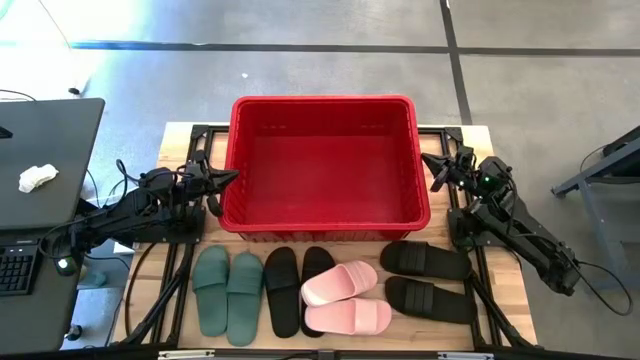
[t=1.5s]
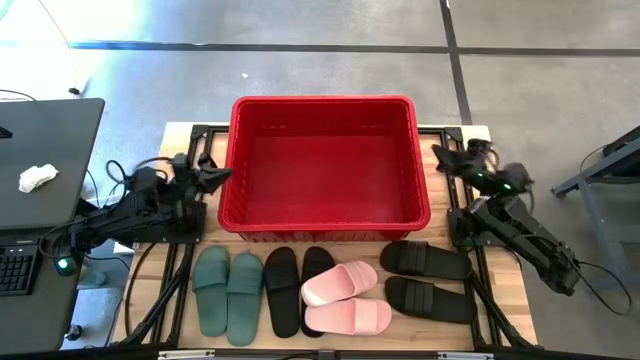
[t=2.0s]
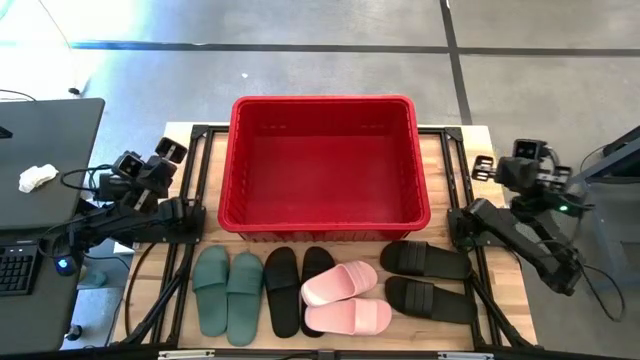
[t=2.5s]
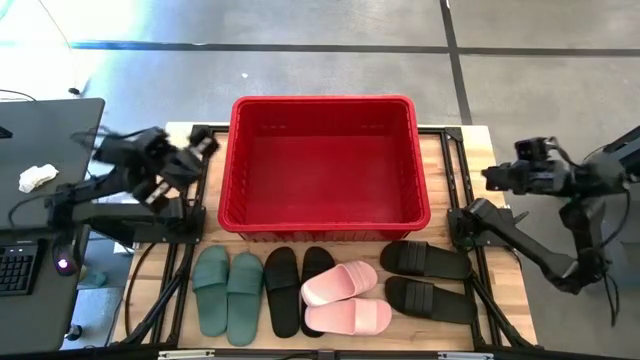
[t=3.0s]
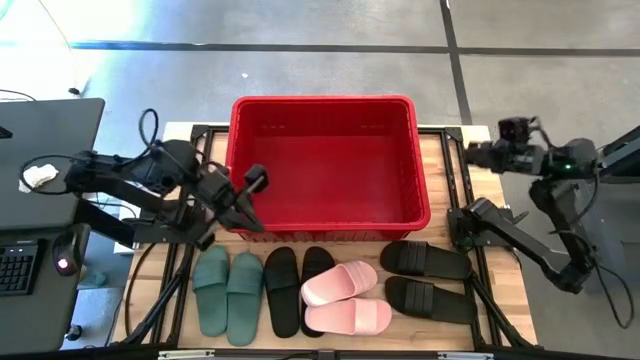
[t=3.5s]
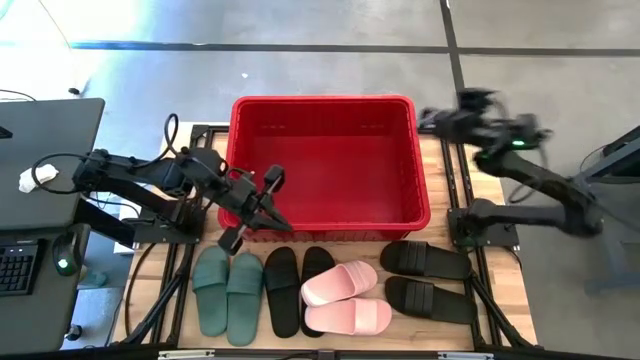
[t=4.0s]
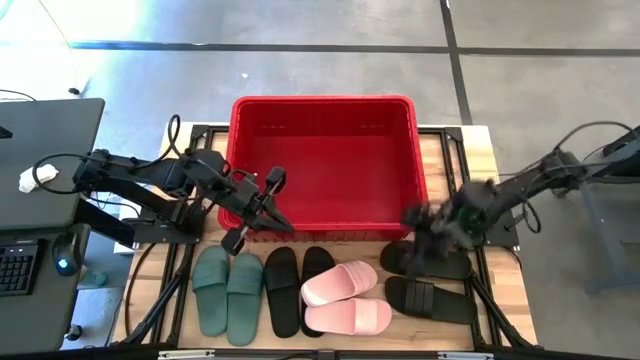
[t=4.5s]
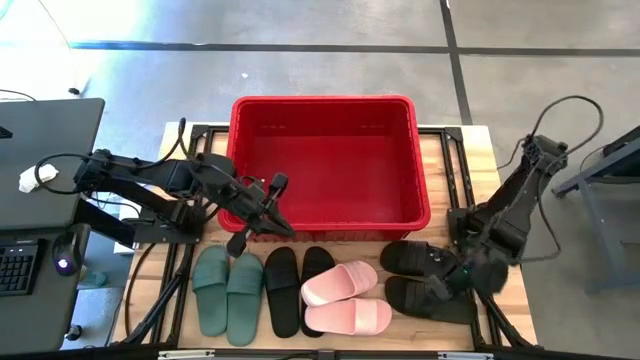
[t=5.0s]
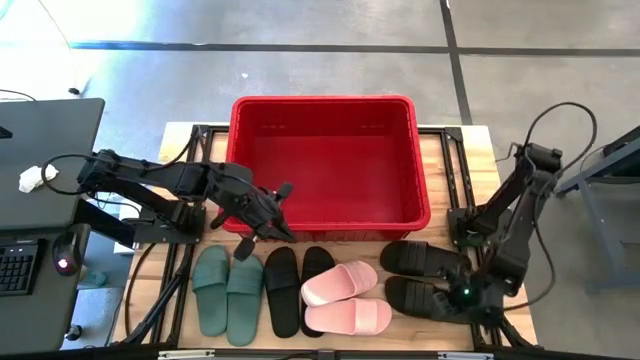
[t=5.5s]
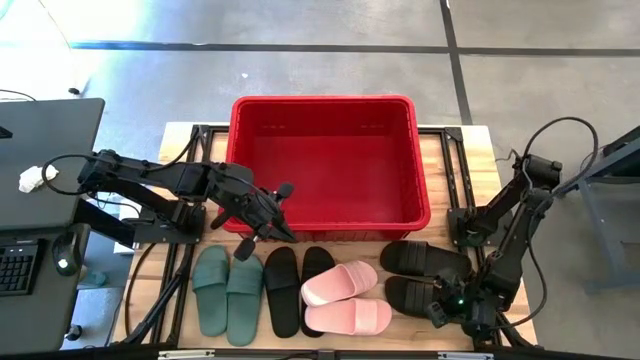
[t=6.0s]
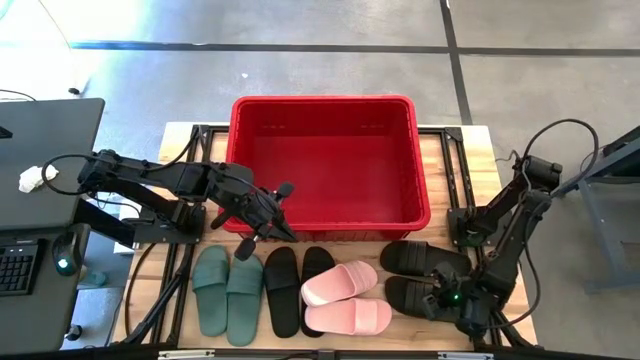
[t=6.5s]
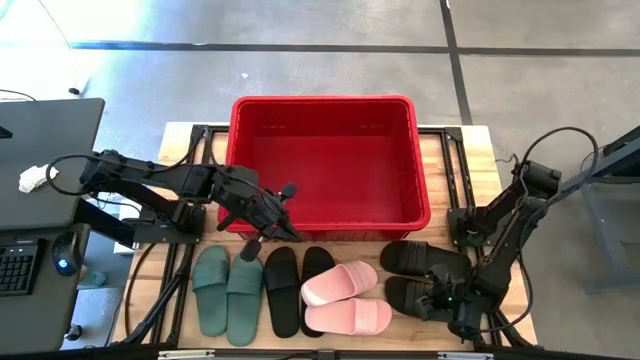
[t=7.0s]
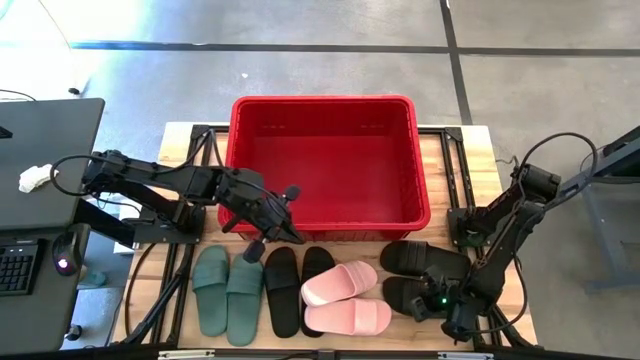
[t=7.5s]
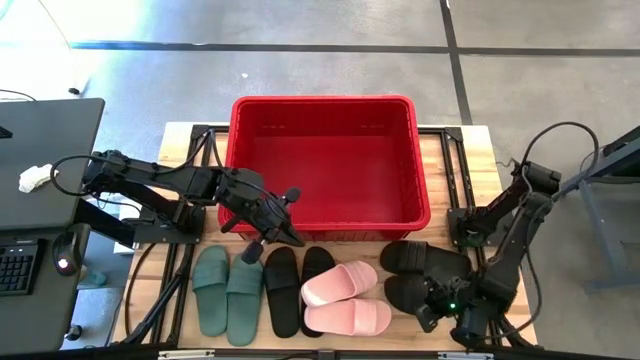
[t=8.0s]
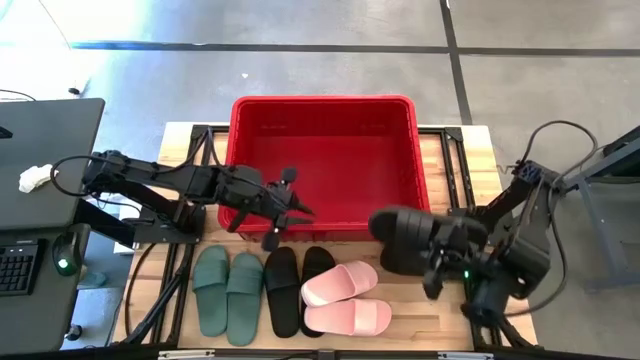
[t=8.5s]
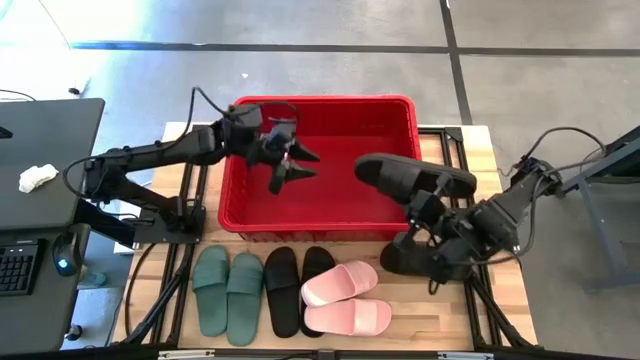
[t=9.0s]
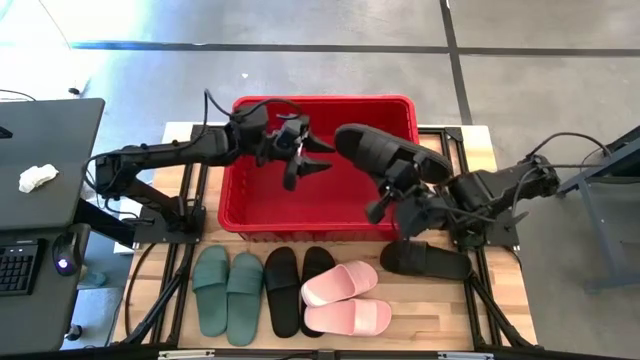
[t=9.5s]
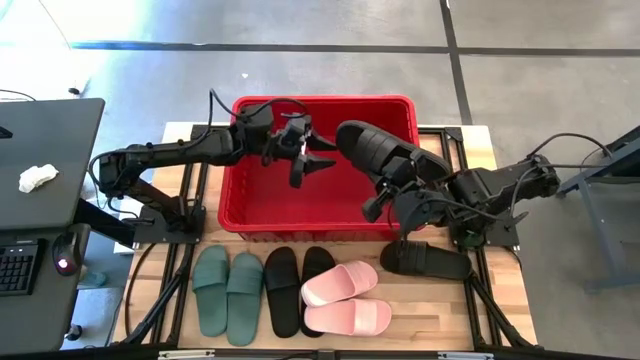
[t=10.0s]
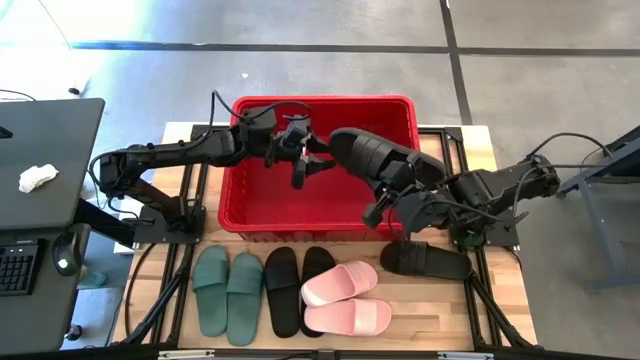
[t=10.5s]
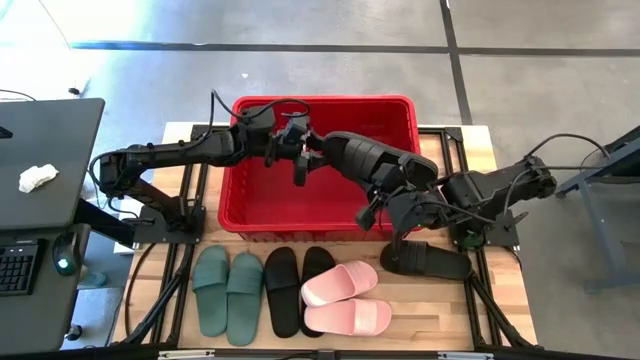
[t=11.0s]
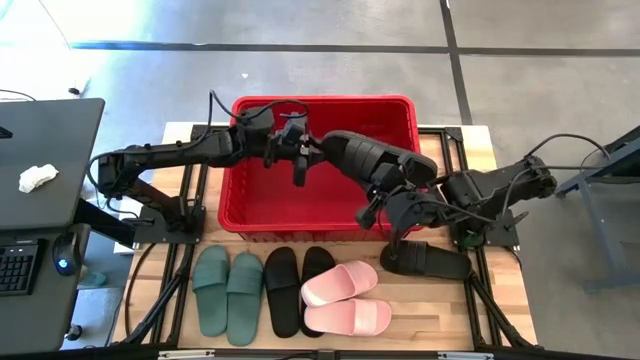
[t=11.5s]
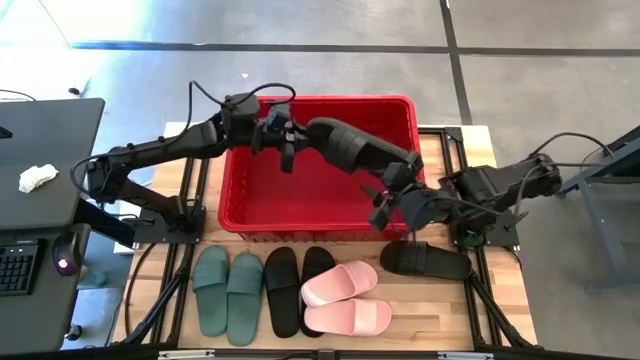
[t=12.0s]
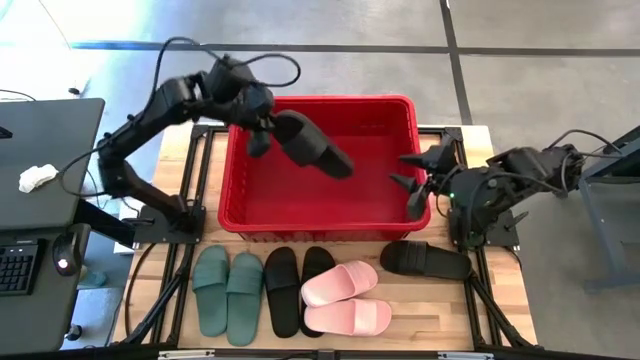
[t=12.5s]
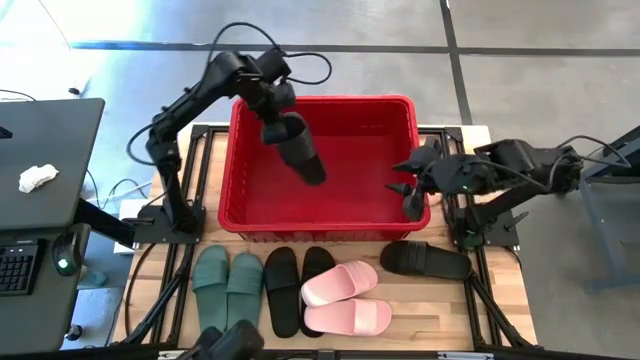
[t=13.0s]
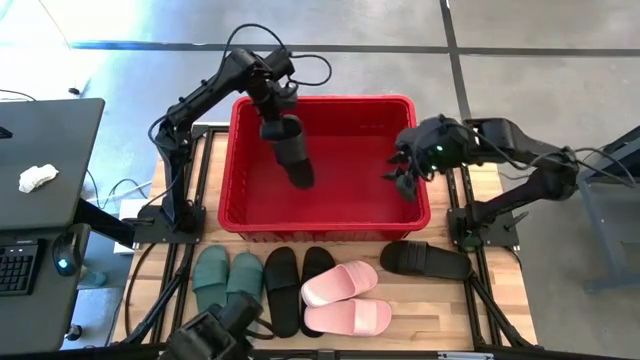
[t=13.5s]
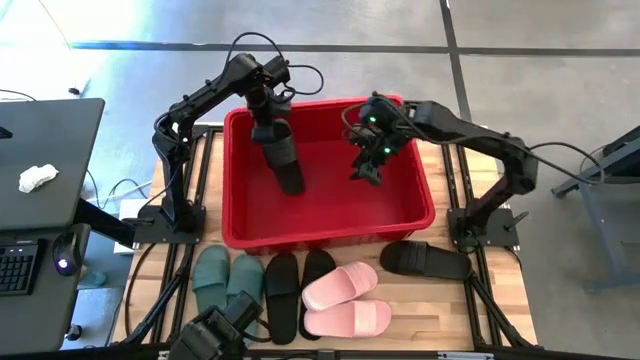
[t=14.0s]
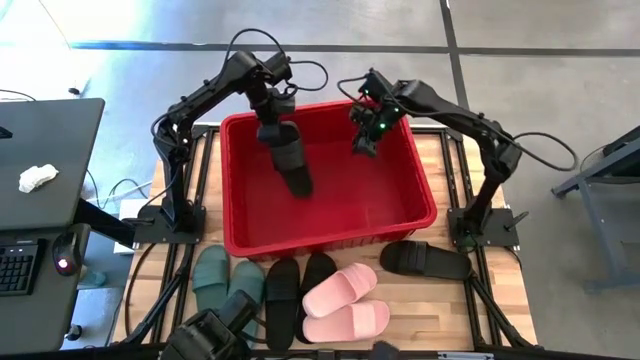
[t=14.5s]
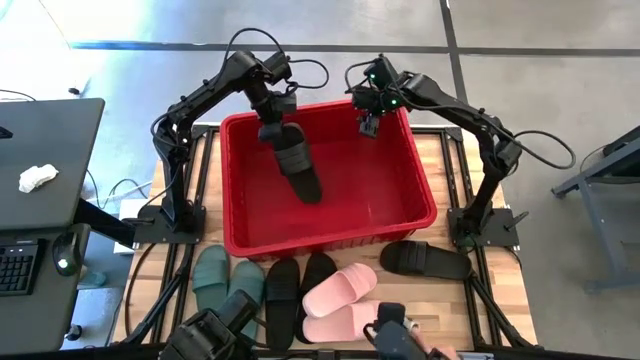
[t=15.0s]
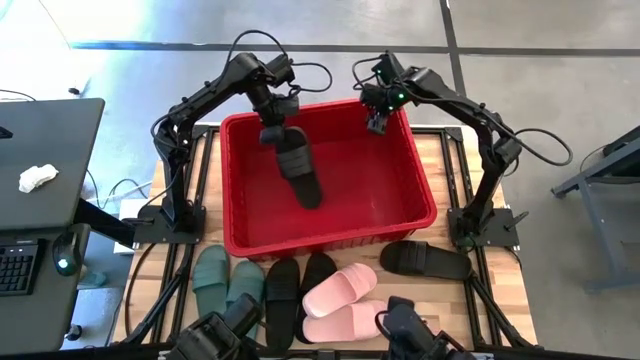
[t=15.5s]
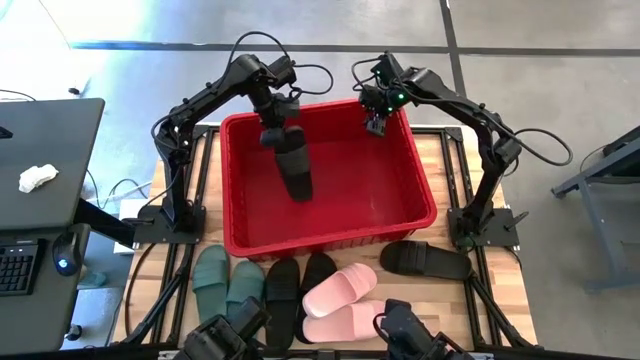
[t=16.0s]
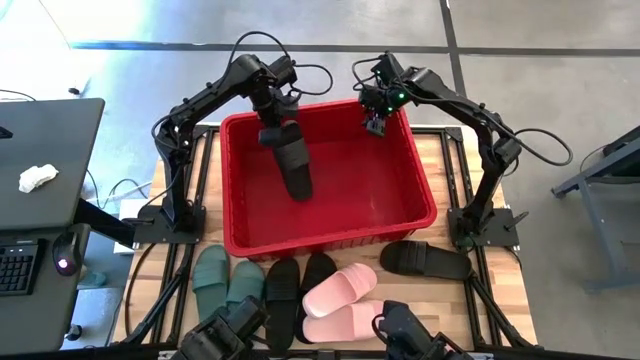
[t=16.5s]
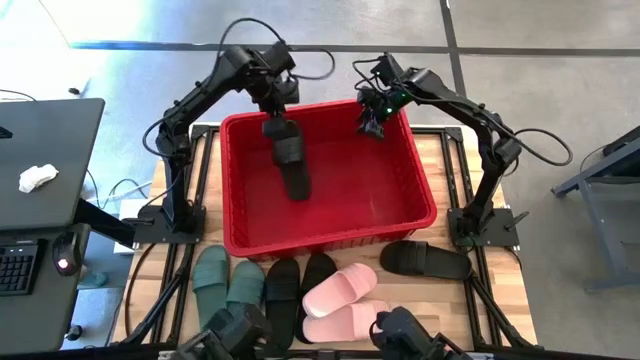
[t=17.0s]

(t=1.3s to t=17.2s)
Task: Pick and place slides into bin
Put the black slipper into the red bin

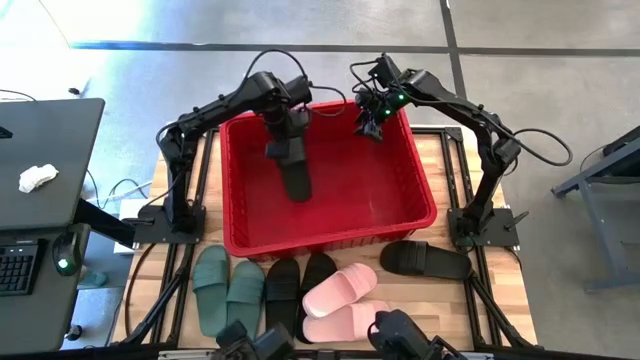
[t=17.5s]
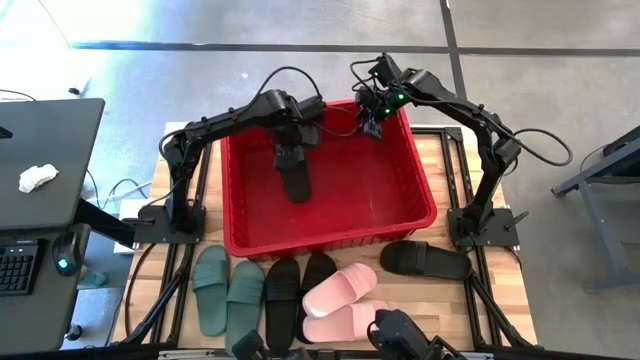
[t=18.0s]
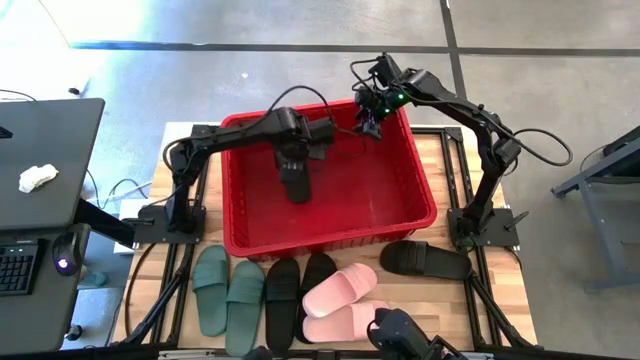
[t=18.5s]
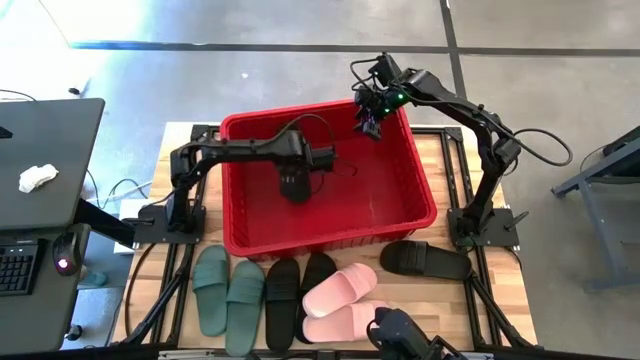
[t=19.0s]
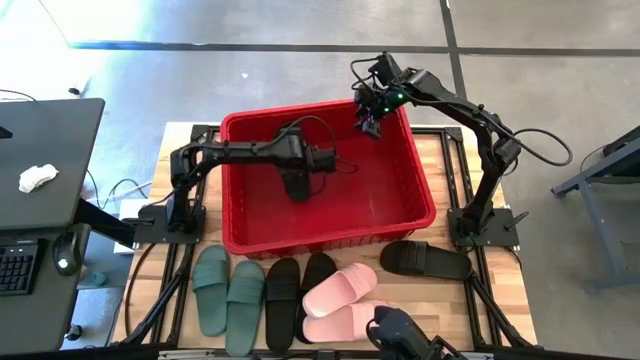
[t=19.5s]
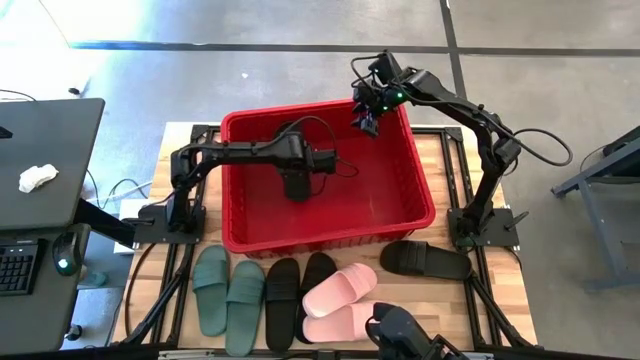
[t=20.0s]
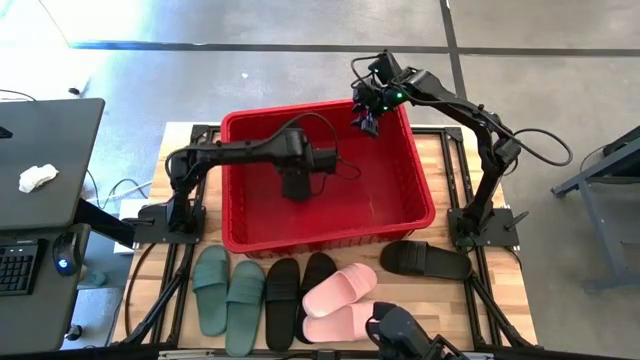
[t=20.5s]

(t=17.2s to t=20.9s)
Adjust the black slipper in the red bin
